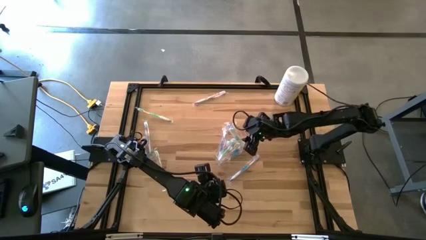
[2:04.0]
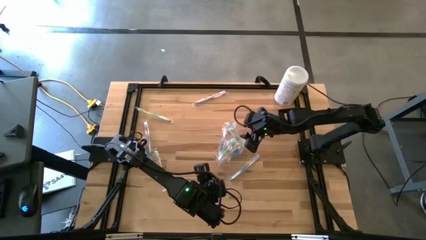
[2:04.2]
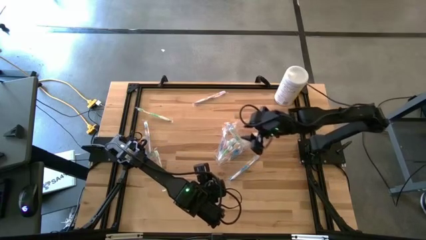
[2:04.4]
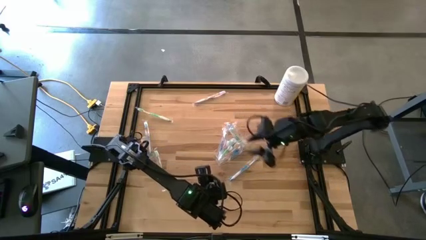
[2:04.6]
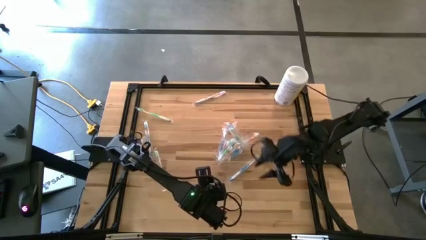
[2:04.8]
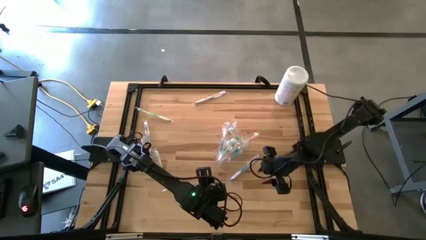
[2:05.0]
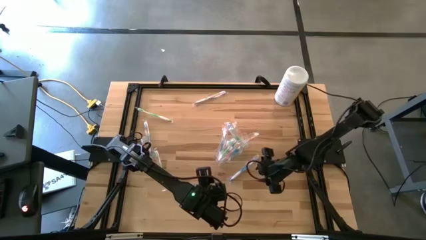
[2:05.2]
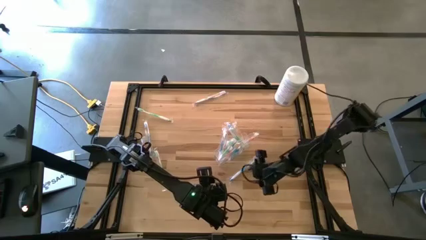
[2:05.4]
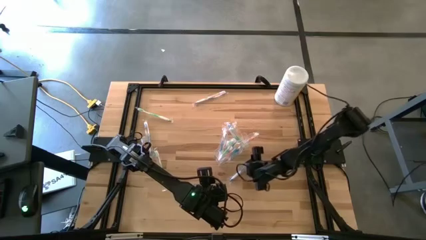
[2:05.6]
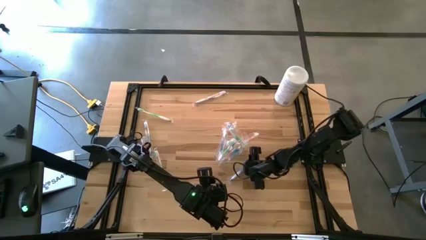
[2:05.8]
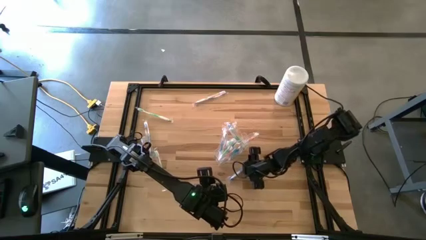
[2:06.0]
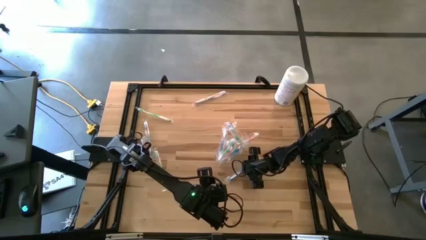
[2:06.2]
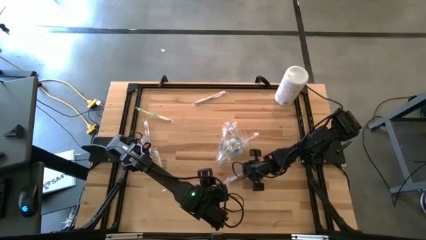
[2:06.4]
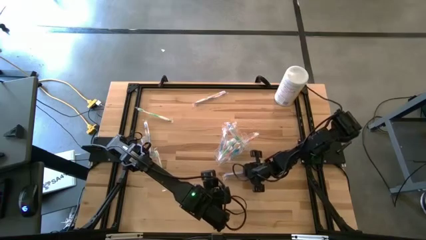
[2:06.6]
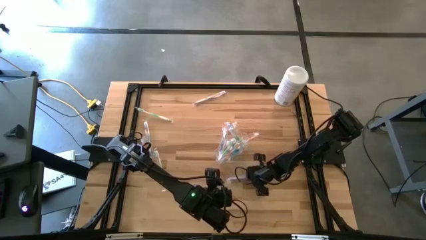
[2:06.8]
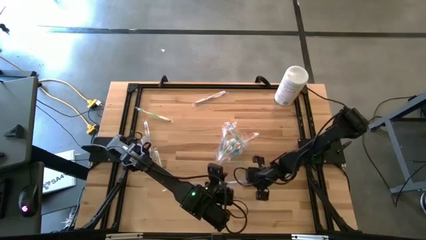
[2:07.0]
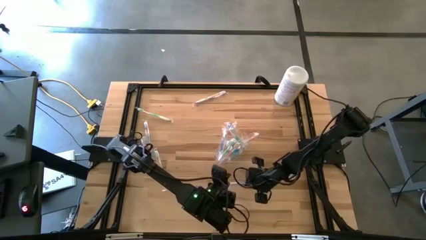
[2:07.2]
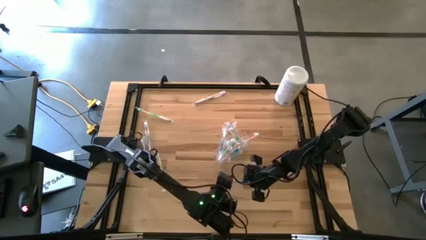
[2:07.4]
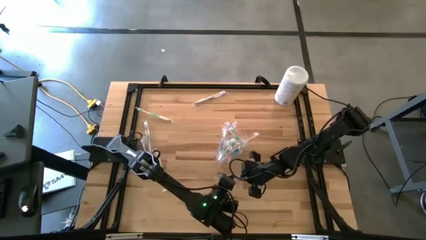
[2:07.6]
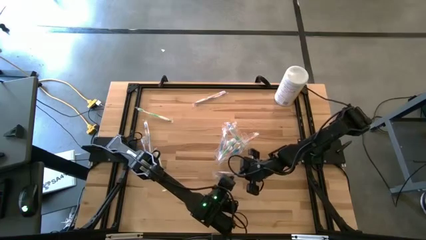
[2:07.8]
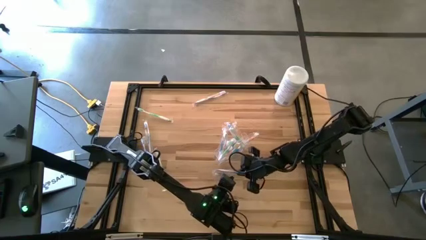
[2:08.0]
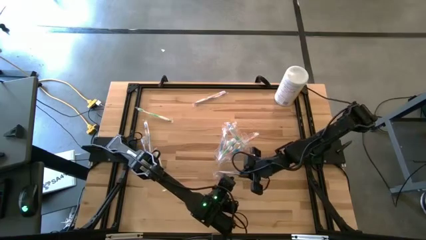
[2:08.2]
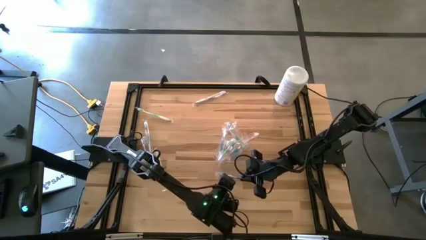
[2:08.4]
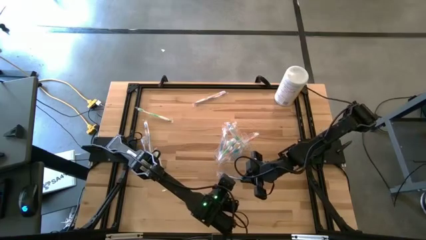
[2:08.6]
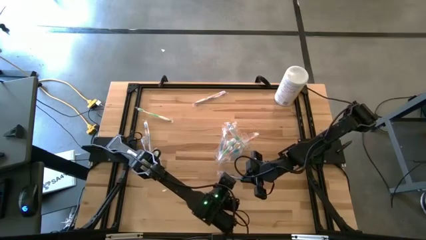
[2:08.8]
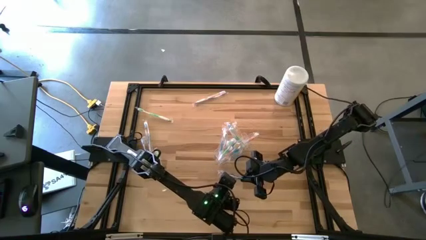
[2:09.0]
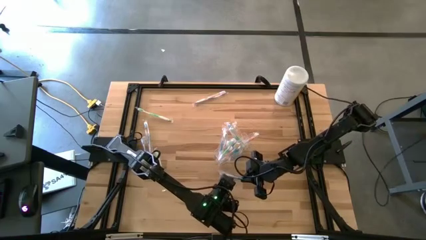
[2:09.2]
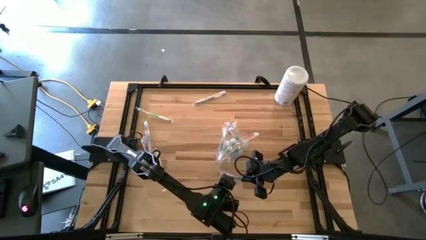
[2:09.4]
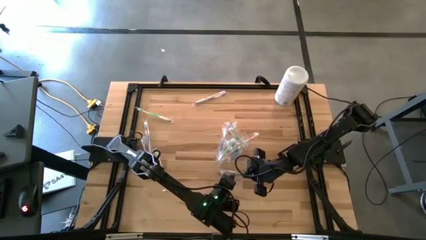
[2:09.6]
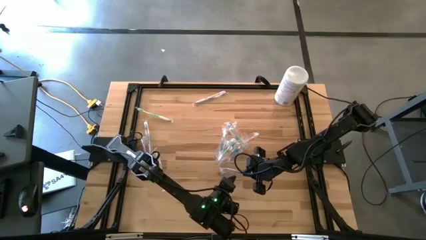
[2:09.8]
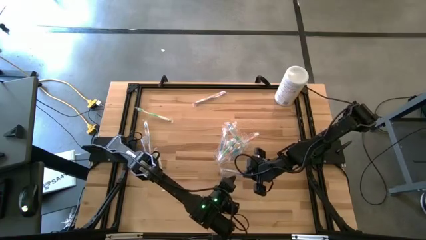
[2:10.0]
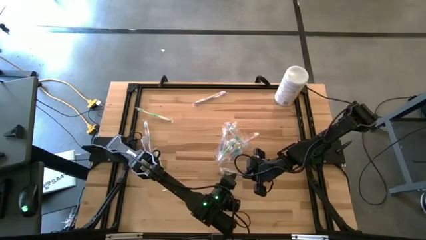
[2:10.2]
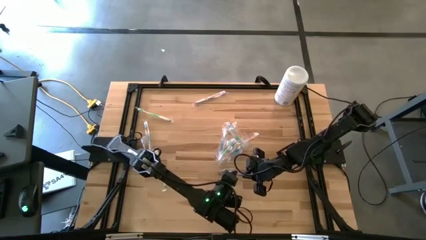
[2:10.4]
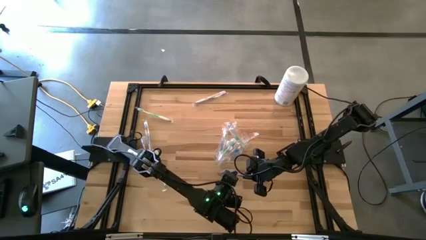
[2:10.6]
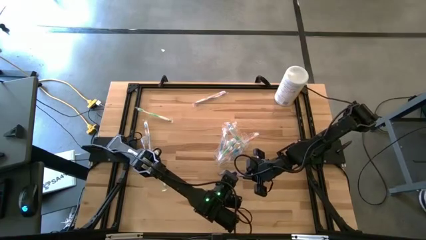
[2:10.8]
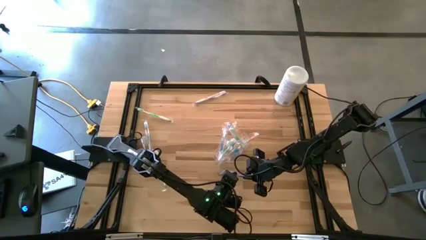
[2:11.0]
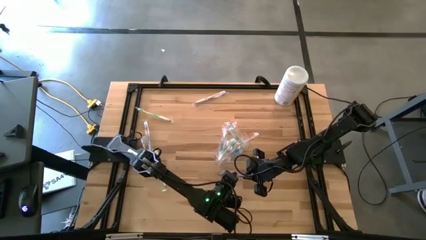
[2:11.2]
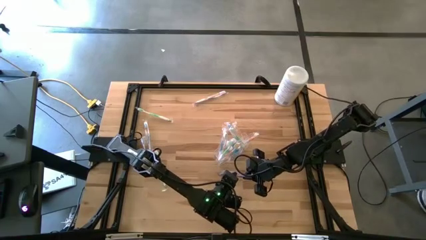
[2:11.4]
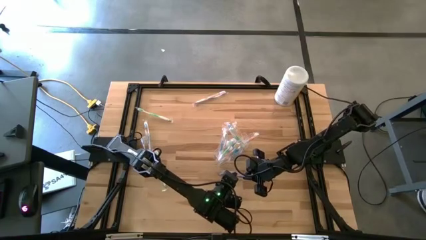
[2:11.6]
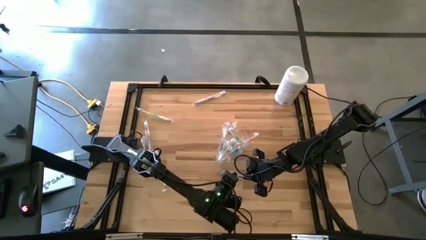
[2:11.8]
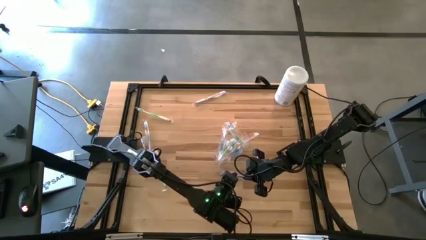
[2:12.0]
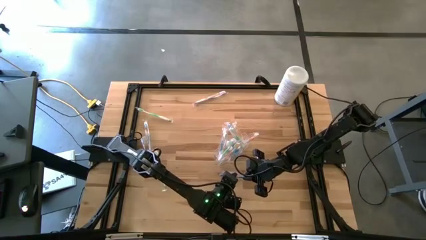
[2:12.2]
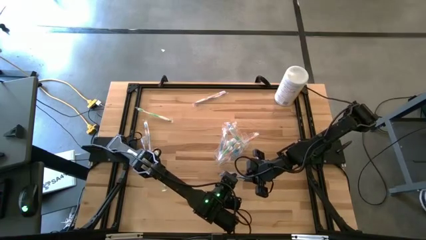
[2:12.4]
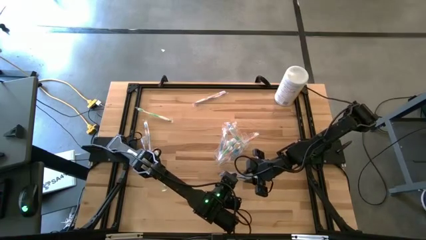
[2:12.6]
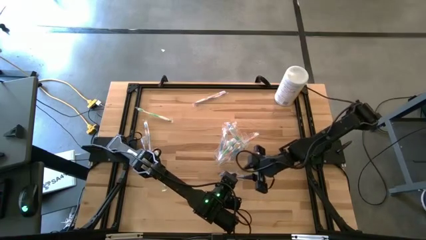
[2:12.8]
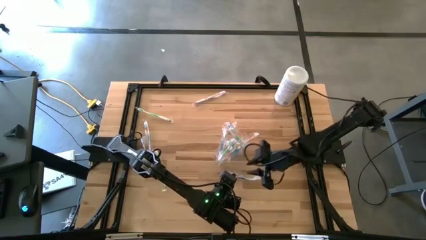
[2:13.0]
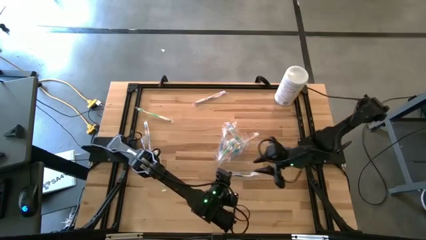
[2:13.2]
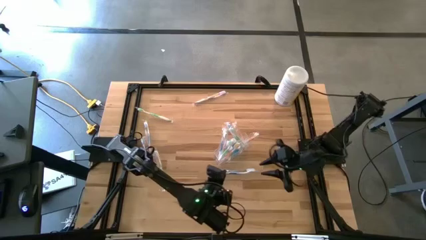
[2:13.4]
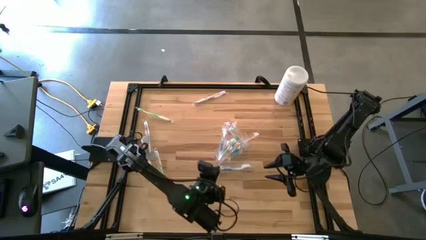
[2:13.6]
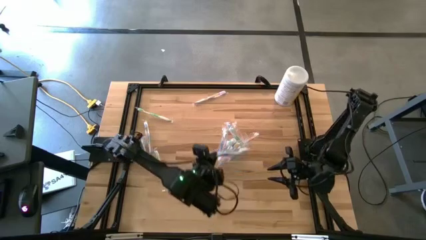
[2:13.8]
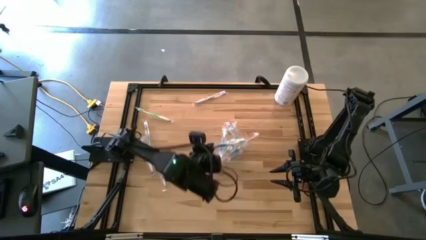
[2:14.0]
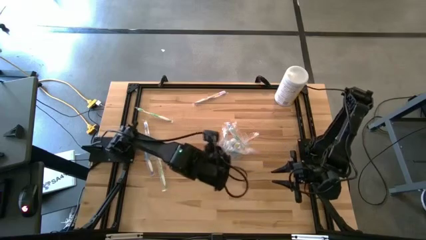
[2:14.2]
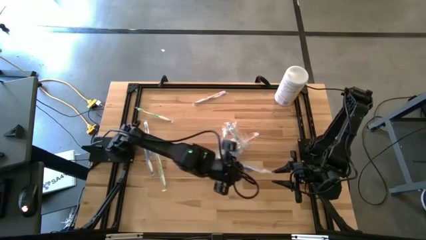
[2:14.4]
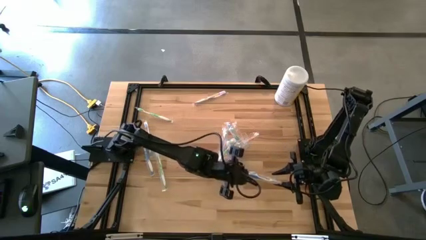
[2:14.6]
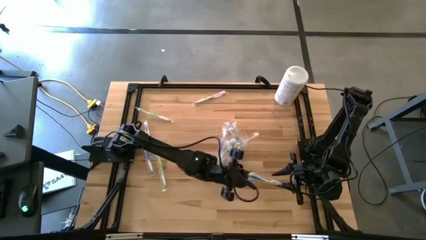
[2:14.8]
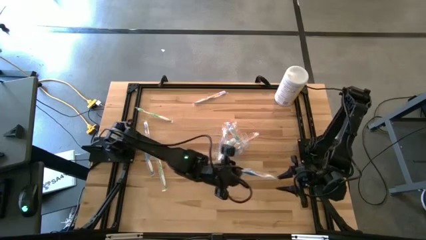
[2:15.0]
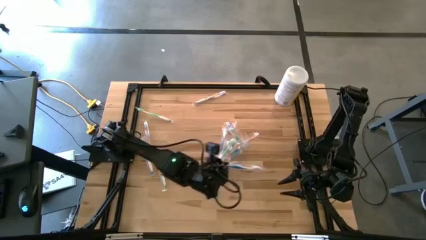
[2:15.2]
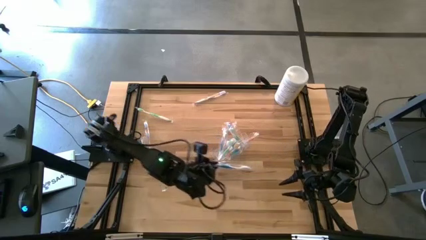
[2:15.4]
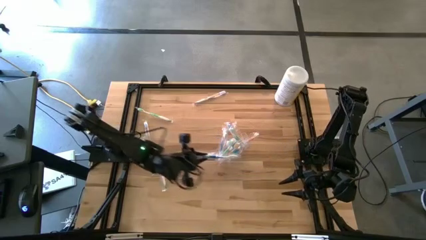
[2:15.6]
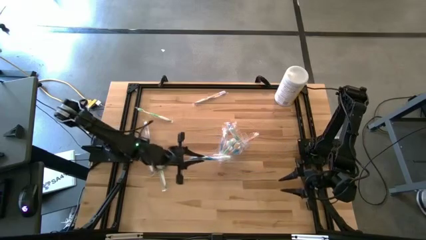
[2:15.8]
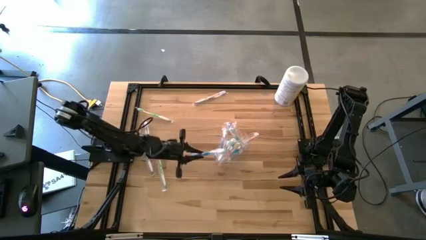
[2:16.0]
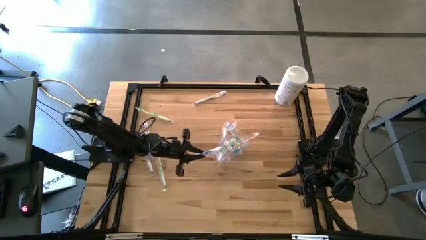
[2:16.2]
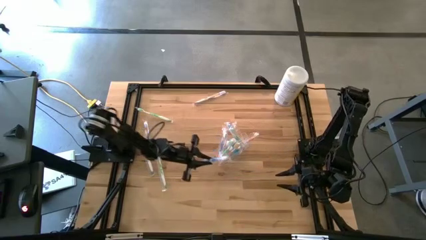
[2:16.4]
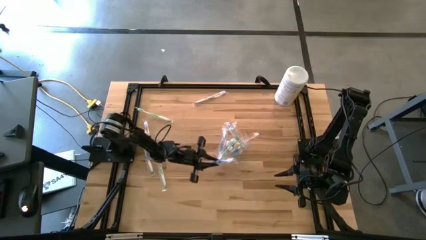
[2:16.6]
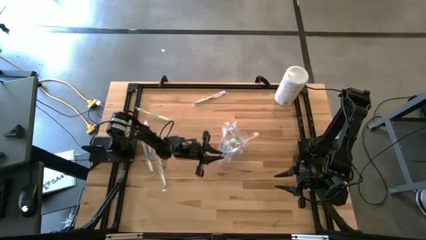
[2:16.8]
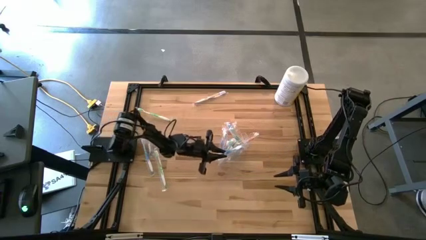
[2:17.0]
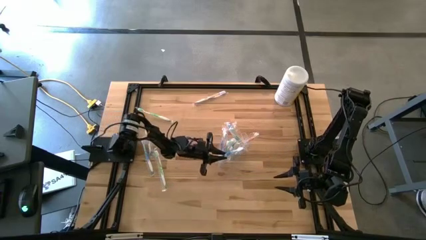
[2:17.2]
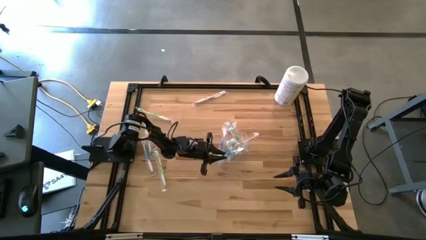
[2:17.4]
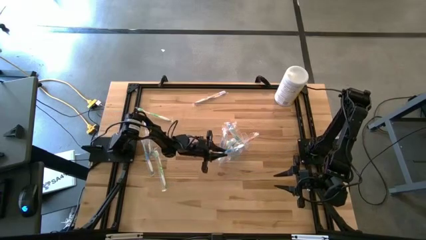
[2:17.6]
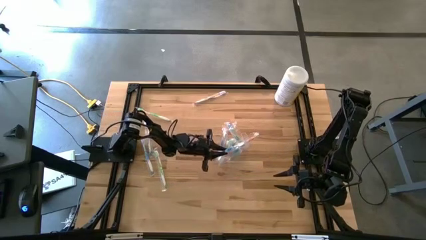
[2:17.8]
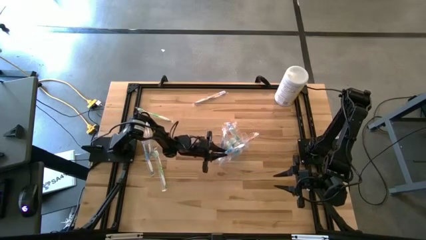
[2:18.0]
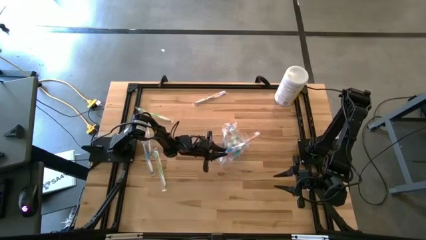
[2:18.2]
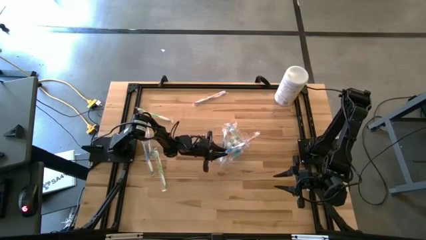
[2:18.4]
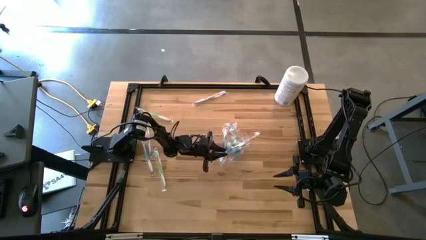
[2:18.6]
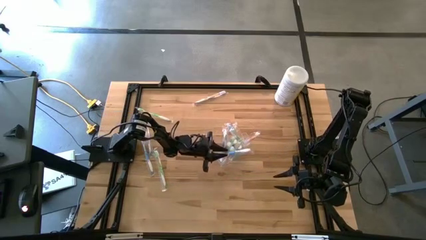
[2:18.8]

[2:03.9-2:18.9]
Task: Pick & Place toothbrushing station
Put the blue toothbrush into the transparent organizer
